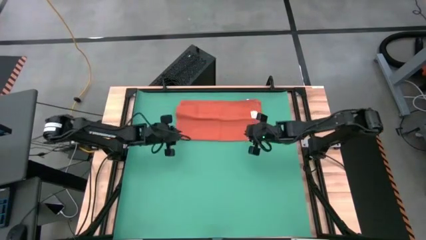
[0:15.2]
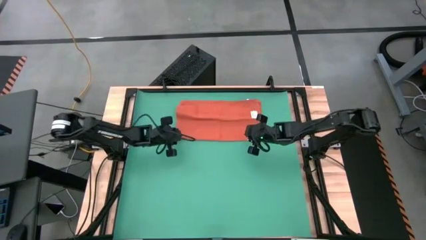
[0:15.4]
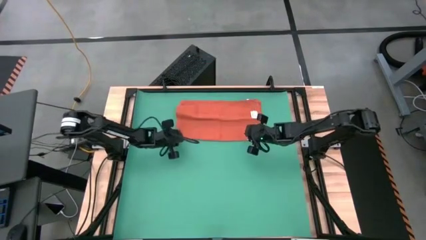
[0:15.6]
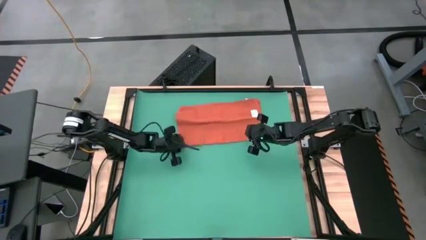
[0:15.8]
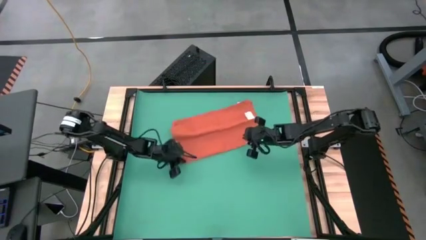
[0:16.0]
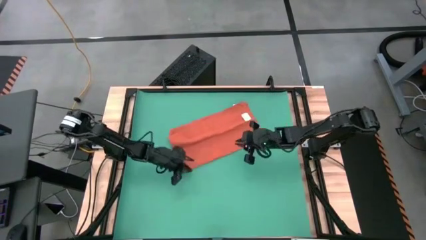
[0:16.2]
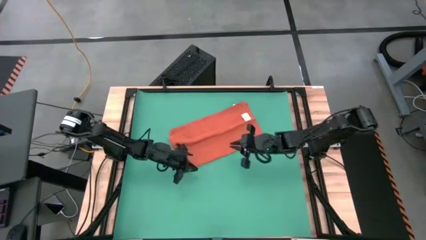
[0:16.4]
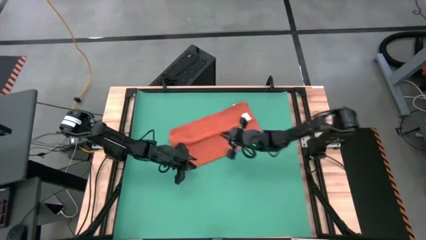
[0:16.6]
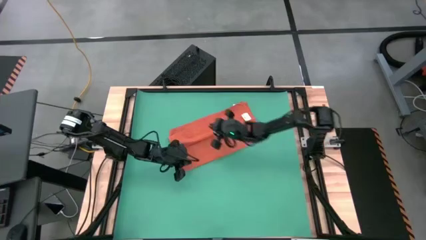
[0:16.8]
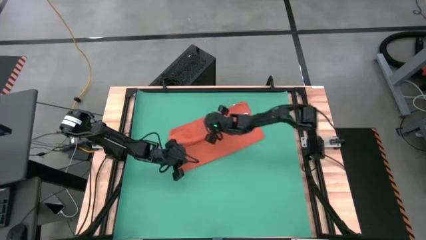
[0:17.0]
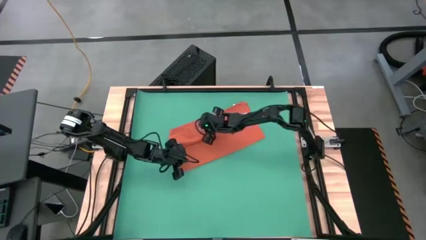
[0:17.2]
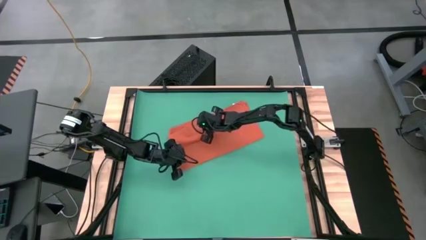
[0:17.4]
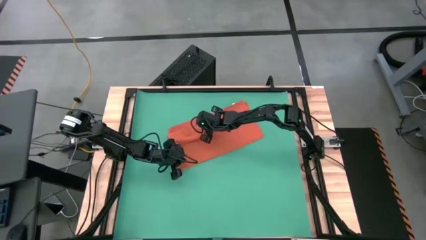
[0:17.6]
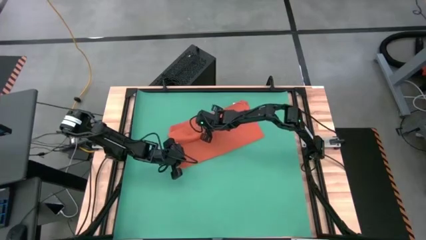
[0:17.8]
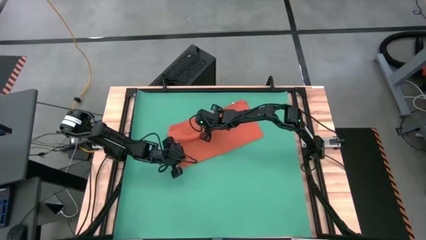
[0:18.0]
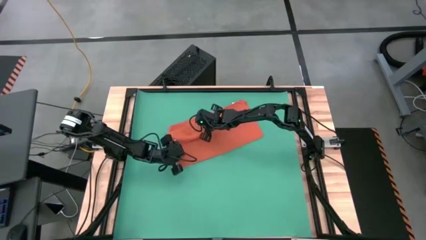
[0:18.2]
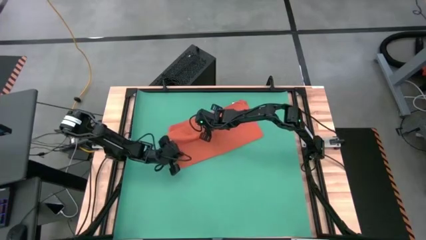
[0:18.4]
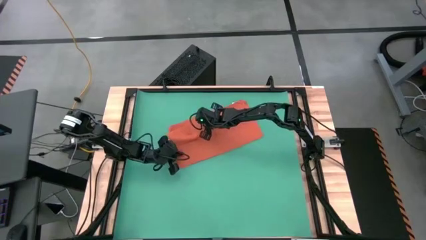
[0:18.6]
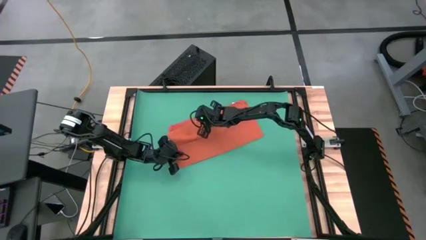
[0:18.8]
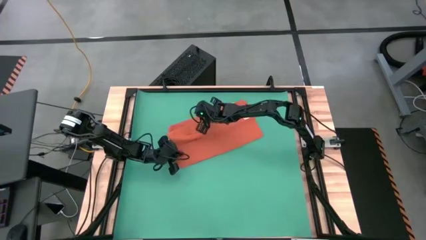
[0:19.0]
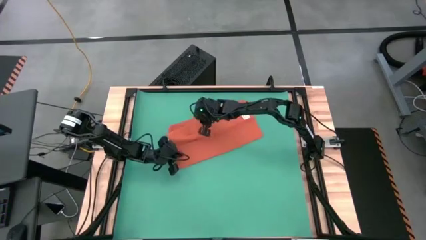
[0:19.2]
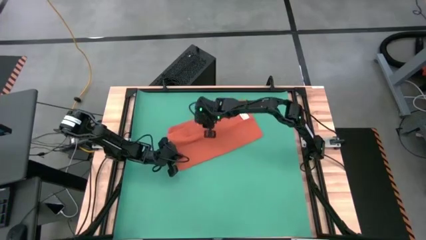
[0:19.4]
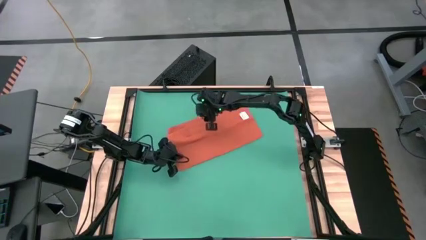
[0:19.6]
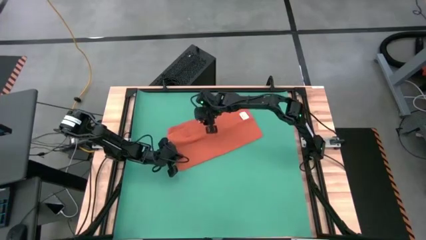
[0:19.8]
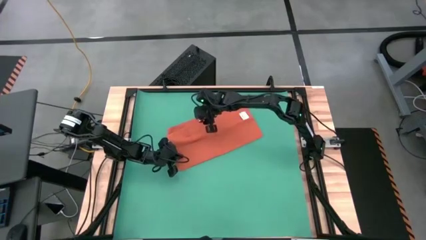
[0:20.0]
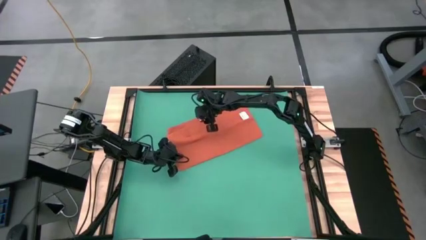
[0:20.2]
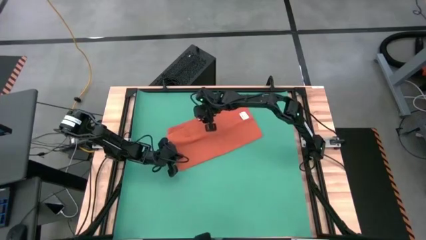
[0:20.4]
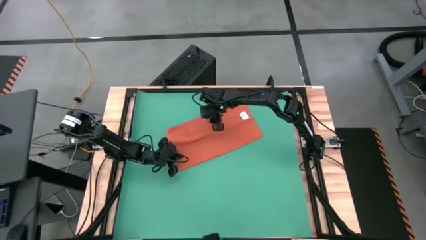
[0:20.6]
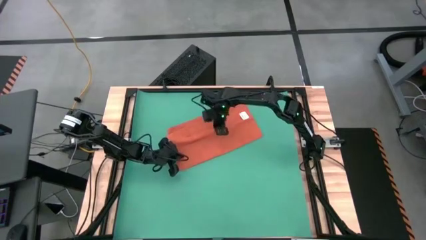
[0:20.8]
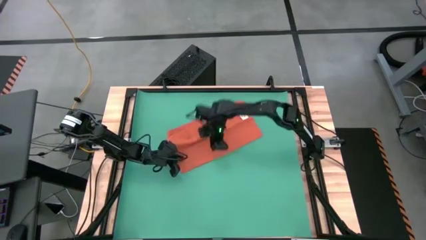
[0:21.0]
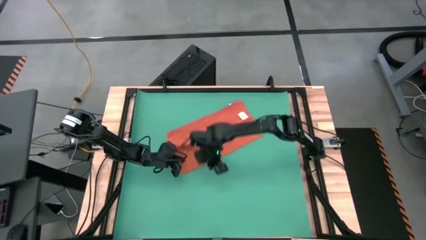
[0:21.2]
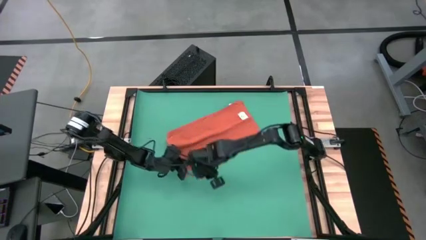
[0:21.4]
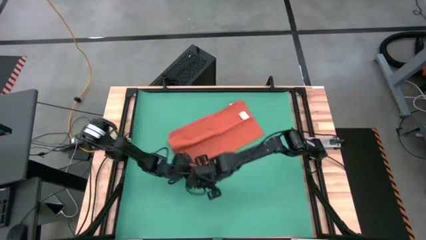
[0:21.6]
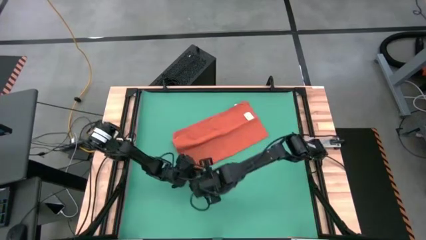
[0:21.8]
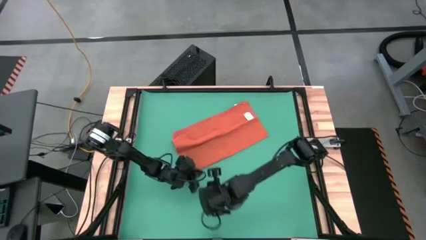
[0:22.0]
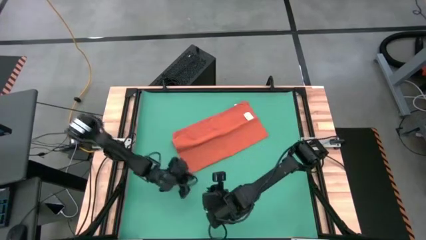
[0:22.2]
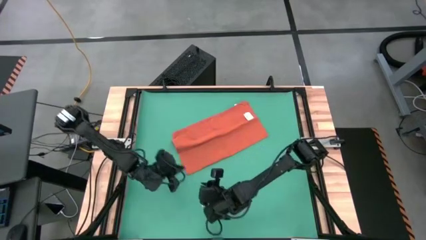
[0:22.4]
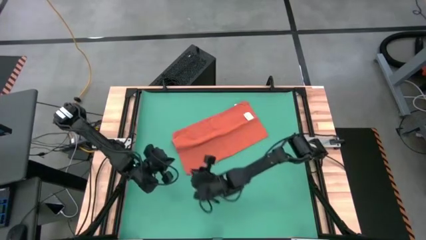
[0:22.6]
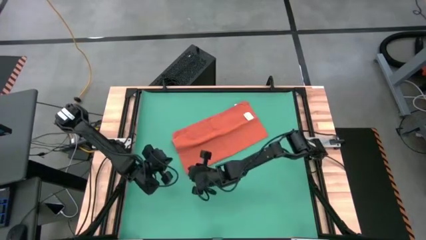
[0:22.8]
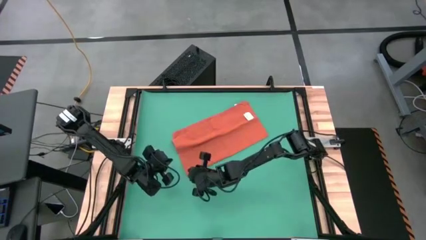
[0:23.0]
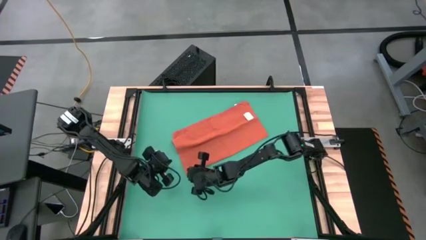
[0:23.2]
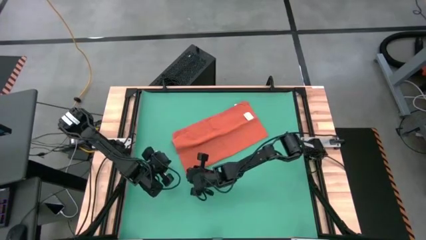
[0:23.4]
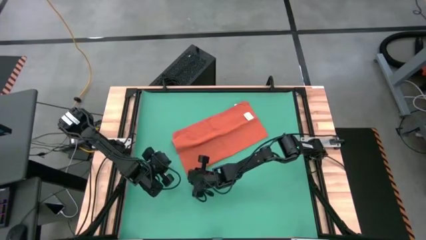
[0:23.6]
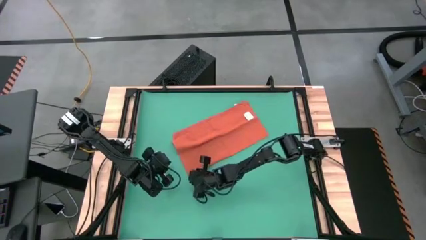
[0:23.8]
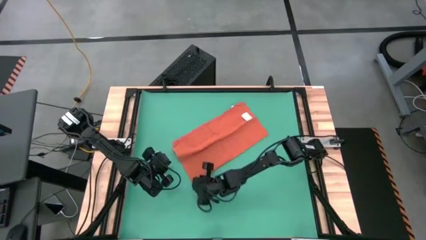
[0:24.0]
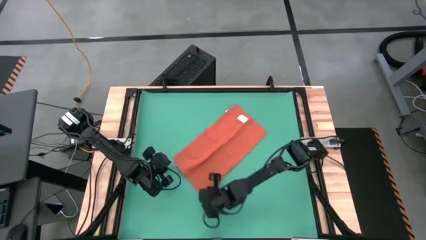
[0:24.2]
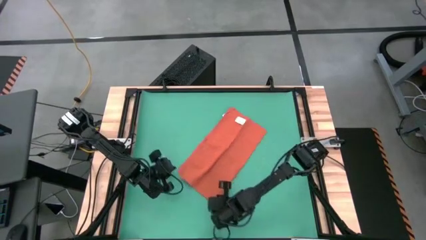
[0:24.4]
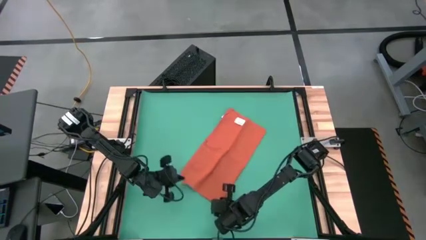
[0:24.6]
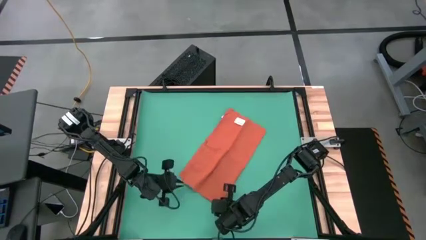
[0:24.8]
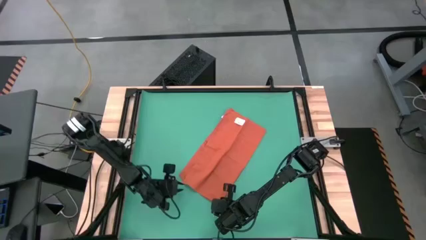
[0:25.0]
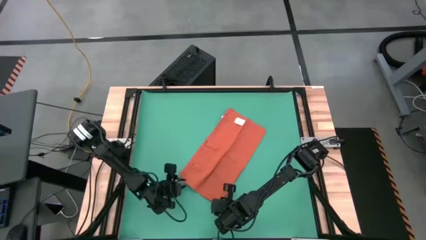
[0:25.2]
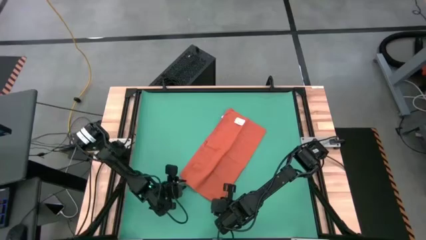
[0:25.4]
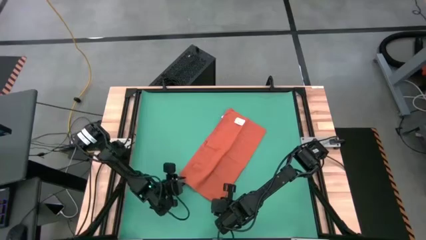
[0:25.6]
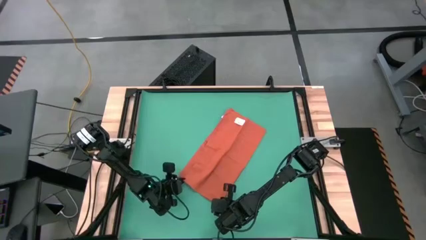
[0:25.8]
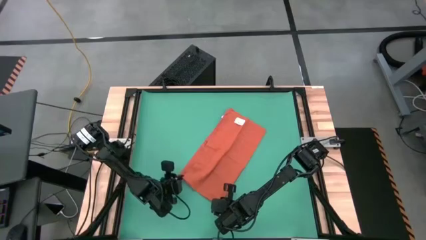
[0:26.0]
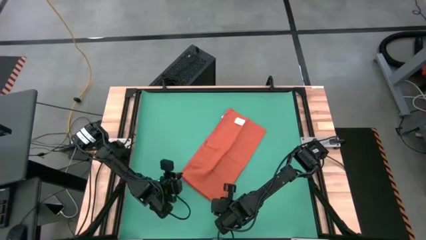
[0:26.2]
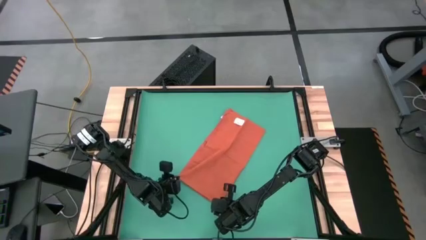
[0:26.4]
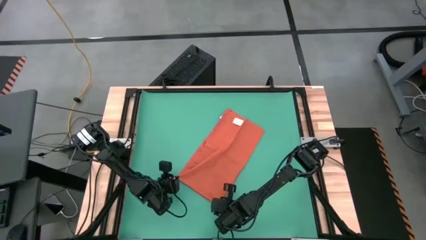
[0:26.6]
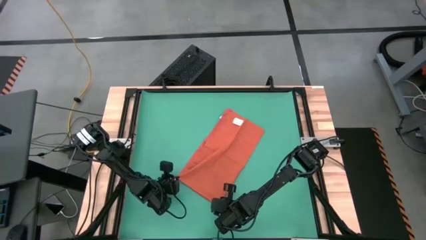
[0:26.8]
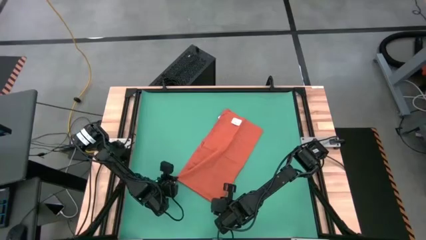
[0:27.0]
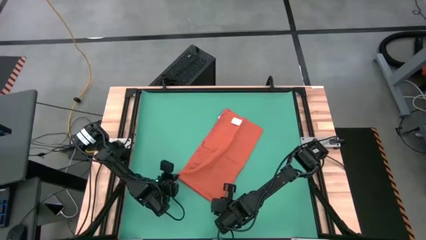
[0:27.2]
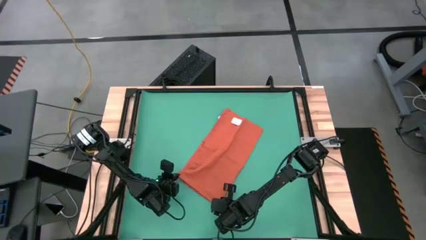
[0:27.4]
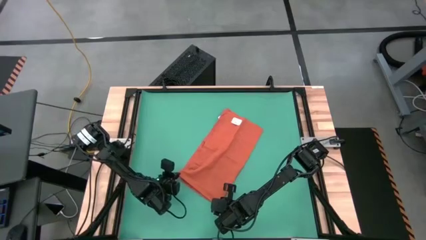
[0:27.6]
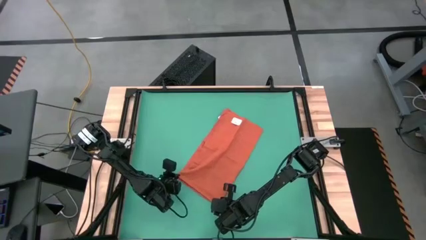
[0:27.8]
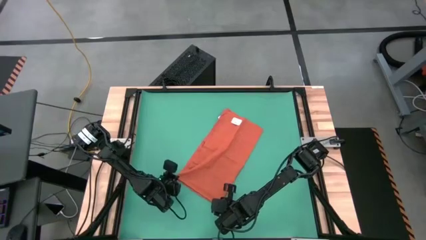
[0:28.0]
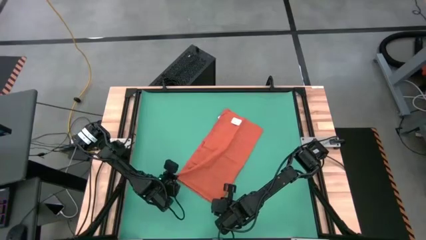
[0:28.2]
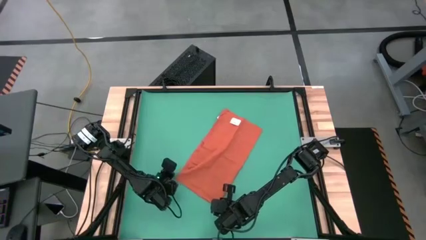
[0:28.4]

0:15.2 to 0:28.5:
Task: Roll towel into tight, uniform cylinder
Fold the orange towel
